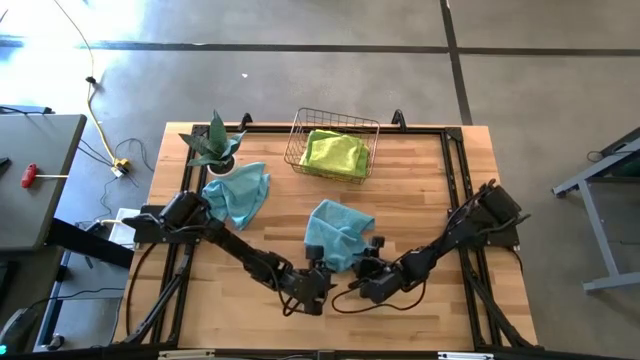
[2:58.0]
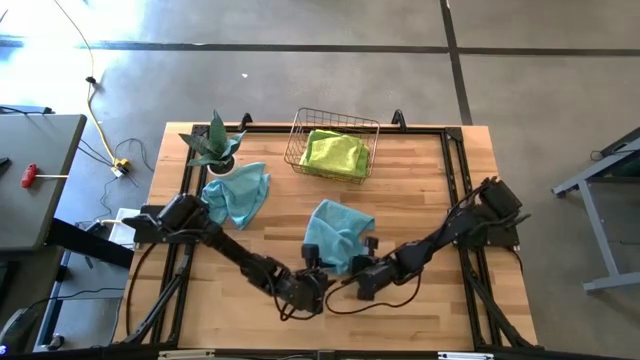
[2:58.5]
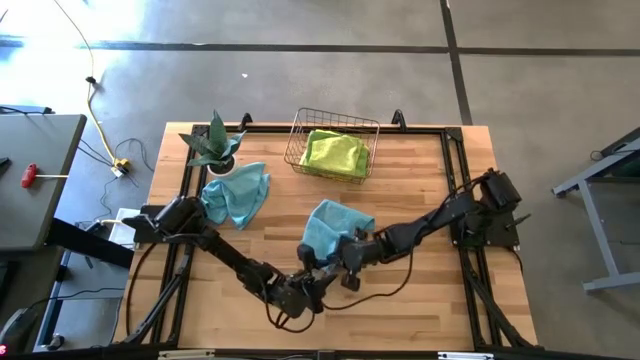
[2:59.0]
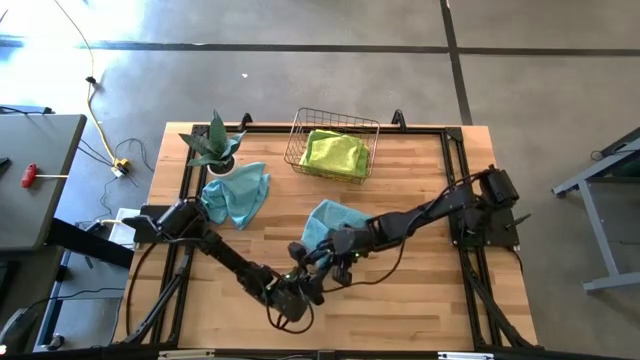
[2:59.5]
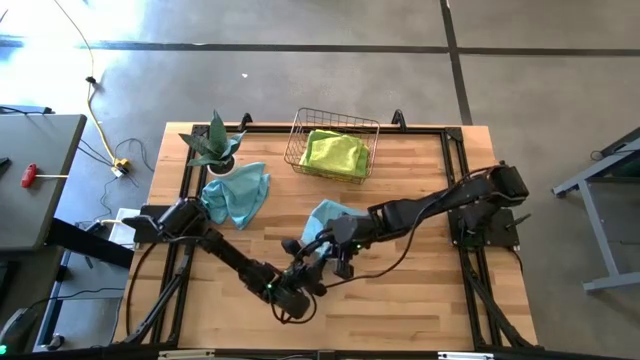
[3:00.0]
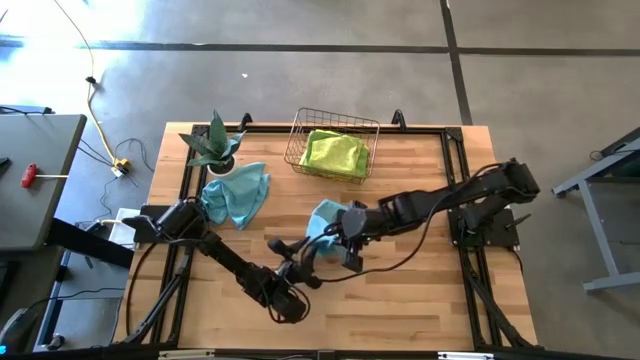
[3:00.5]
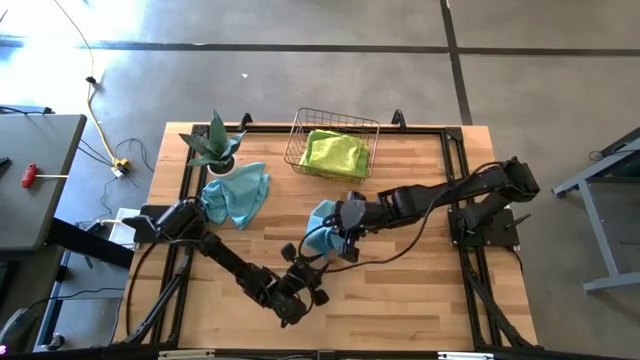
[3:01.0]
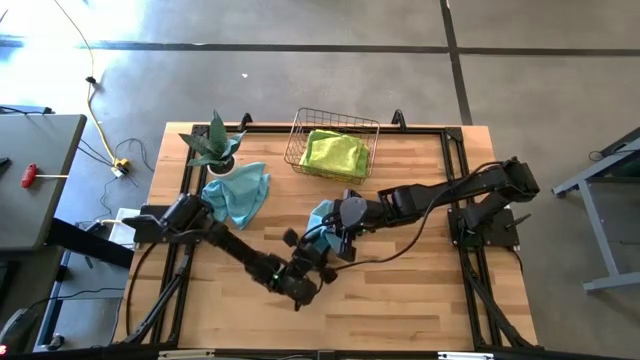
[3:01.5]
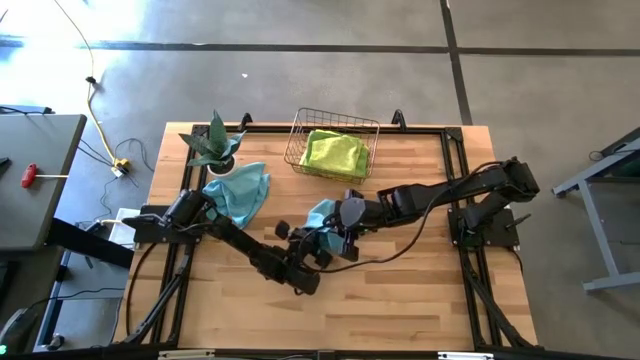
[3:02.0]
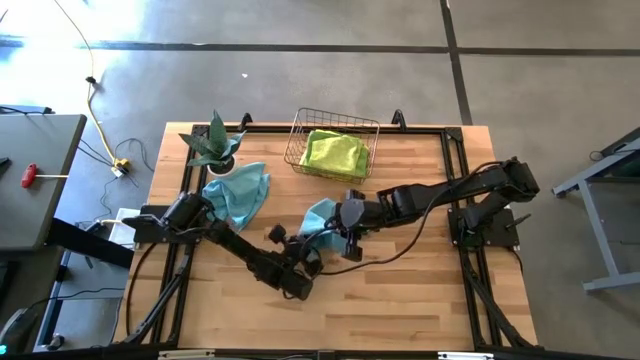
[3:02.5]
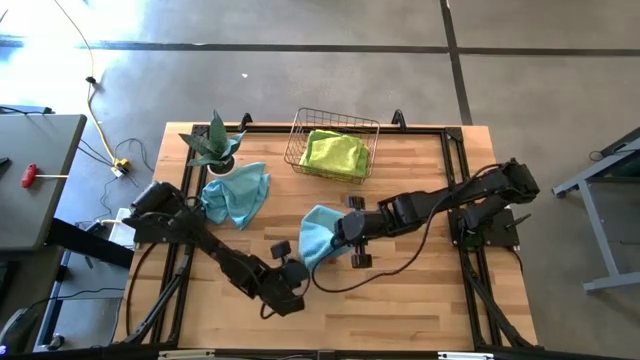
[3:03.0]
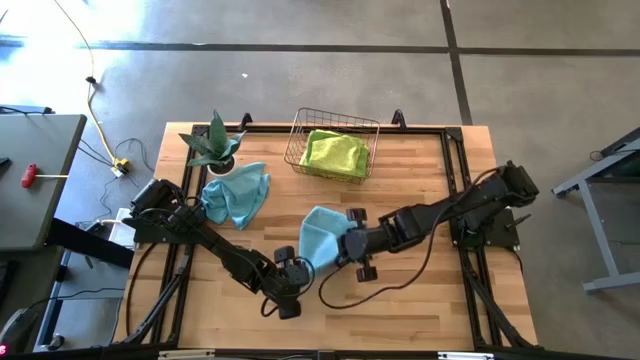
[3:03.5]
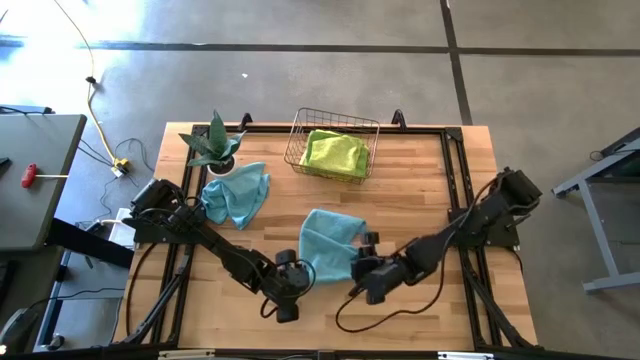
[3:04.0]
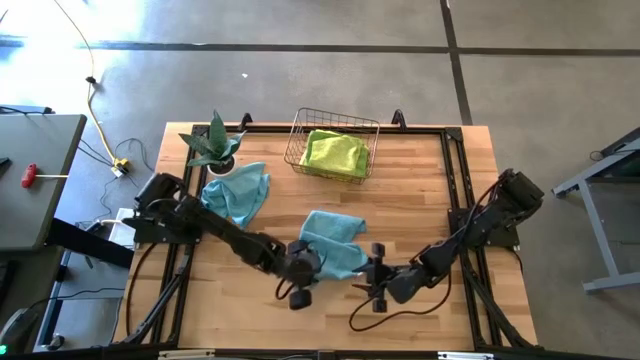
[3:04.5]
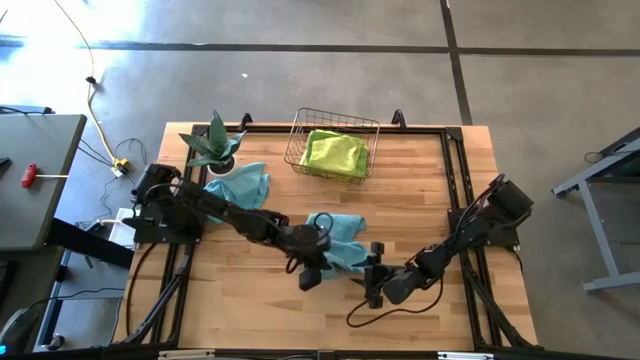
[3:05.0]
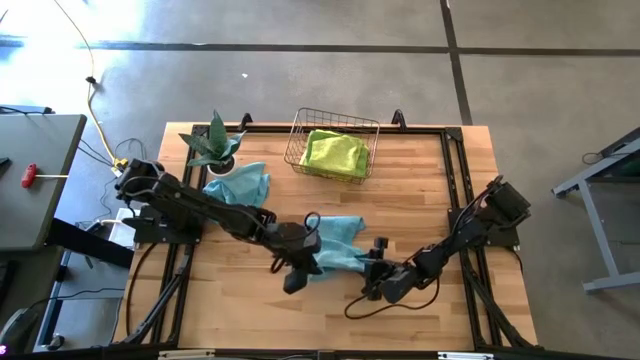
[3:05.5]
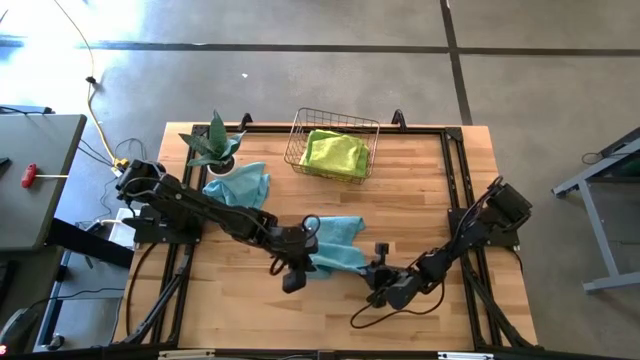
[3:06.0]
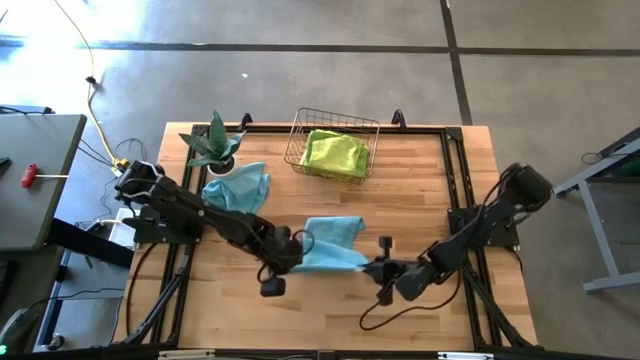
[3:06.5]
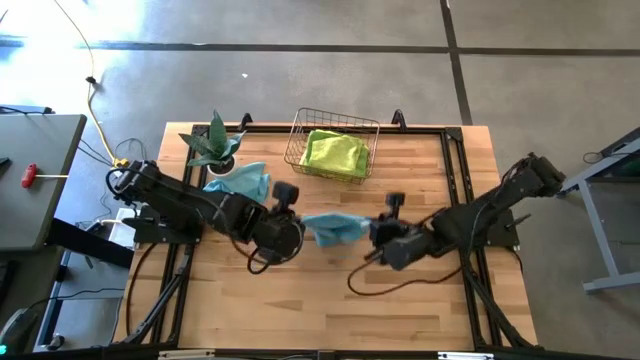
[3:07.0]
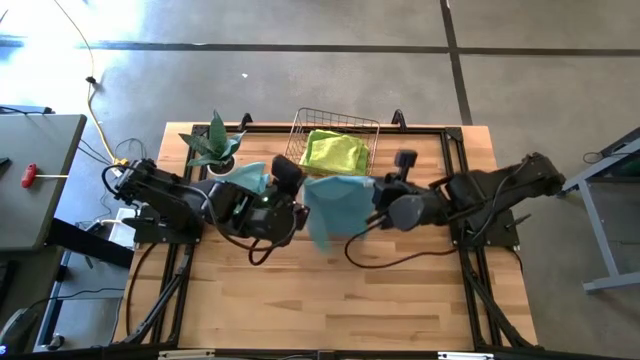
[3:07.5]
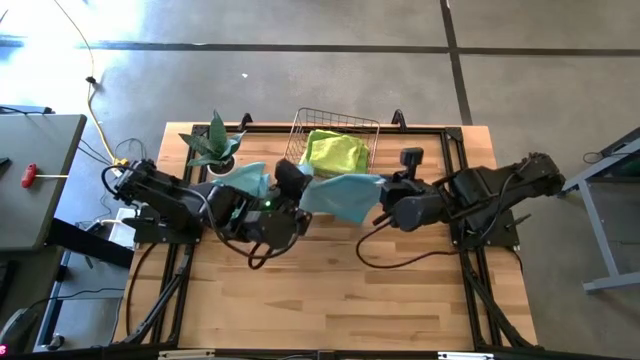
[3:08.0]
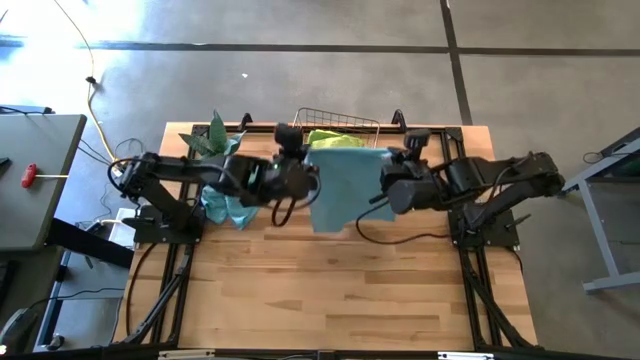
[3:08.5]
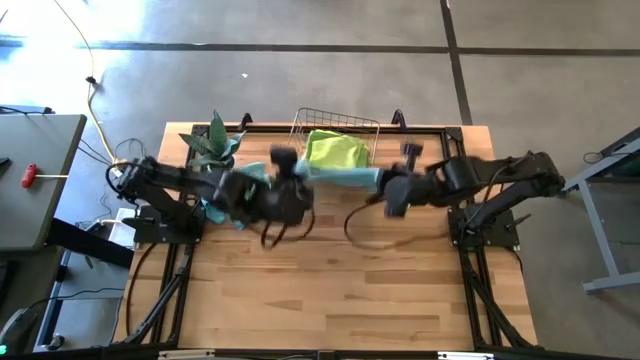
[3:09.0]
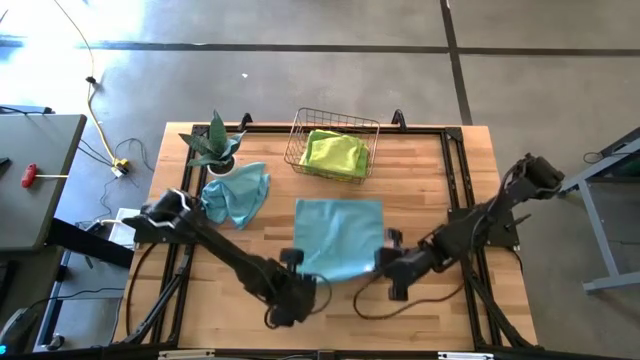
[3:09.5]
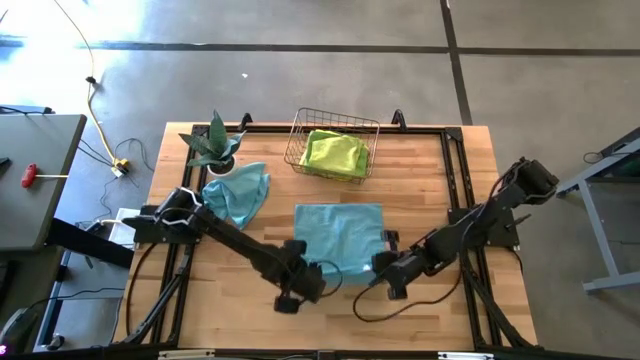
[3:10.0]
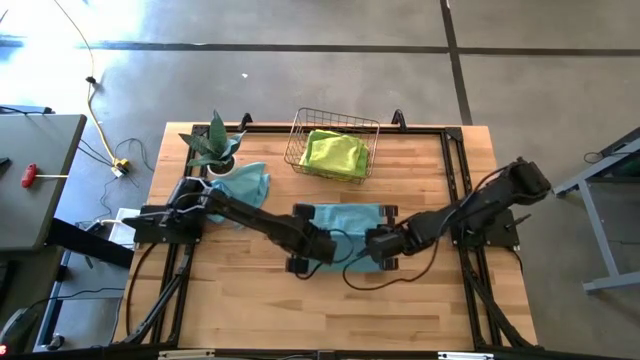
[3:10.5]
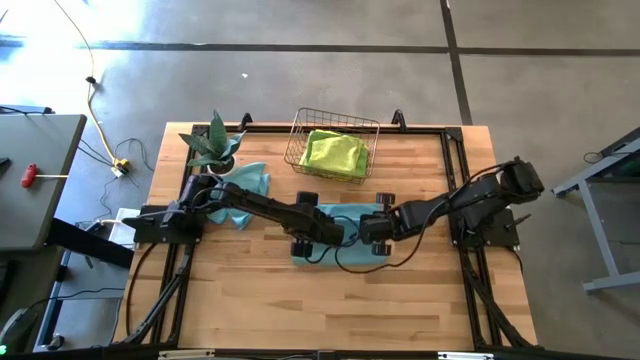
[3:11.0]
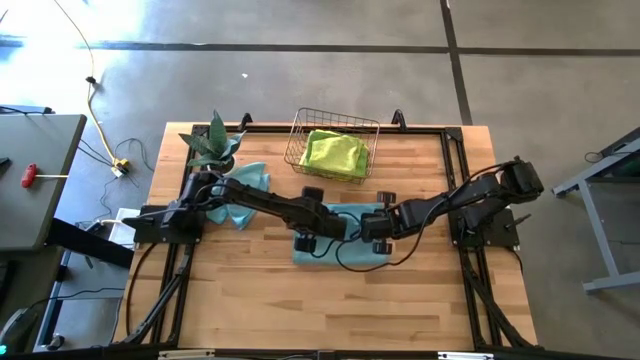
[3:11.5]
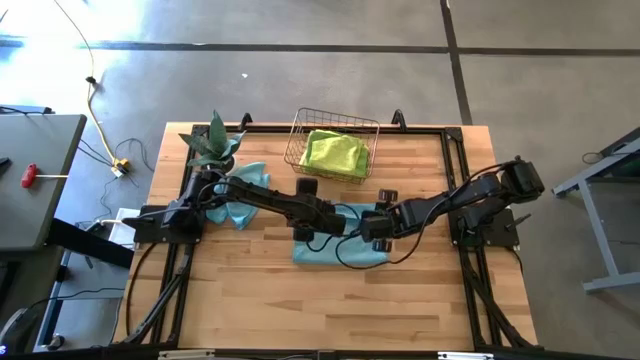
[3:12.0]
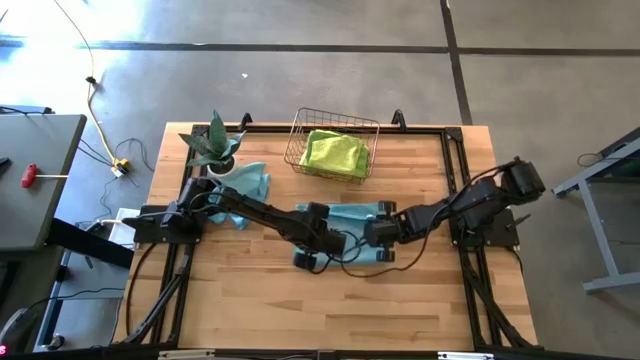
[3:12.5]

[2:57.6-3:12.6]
Task: Fold microfiber towels
Fold the bottom blue microfiber towel

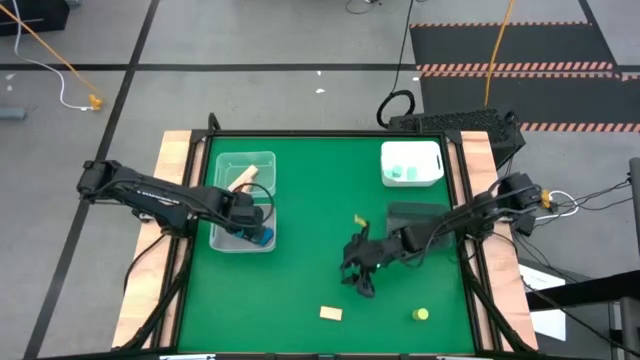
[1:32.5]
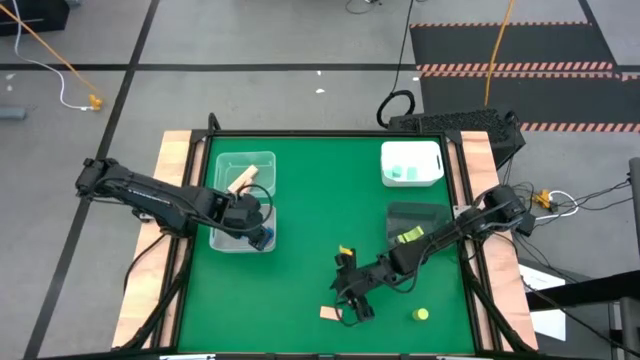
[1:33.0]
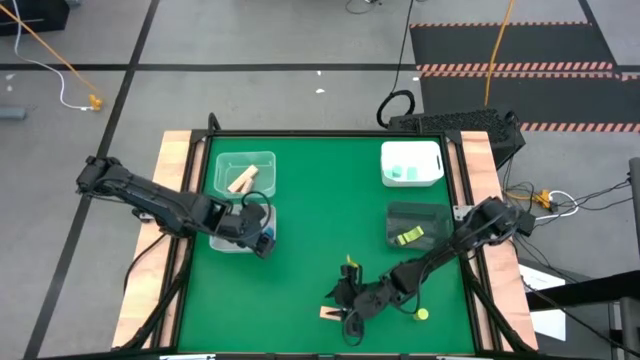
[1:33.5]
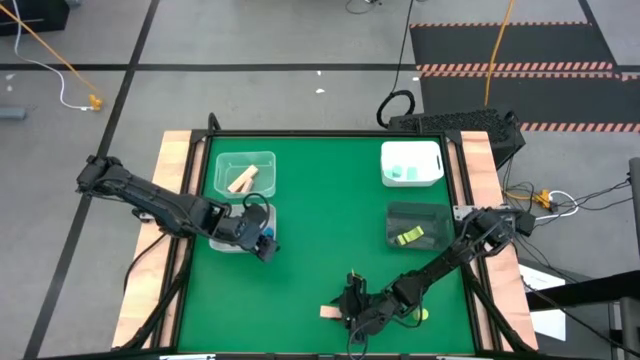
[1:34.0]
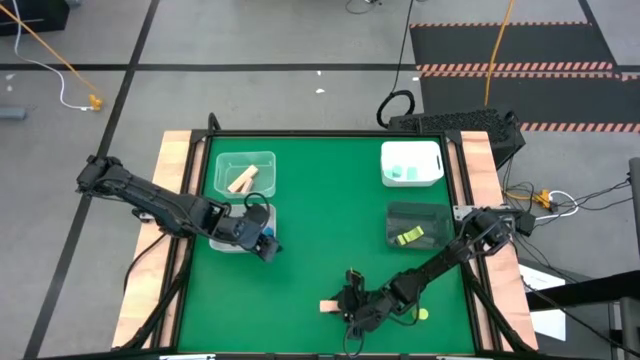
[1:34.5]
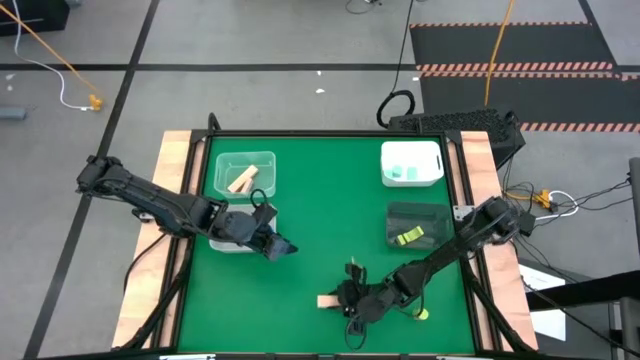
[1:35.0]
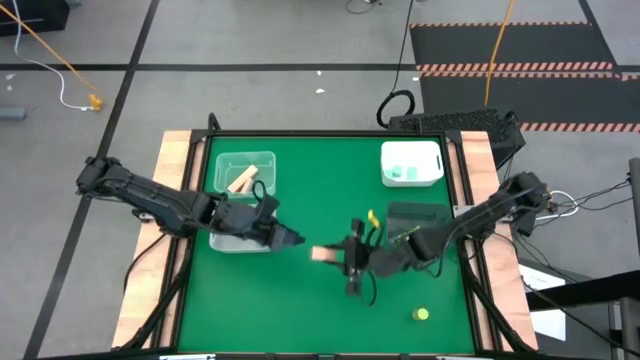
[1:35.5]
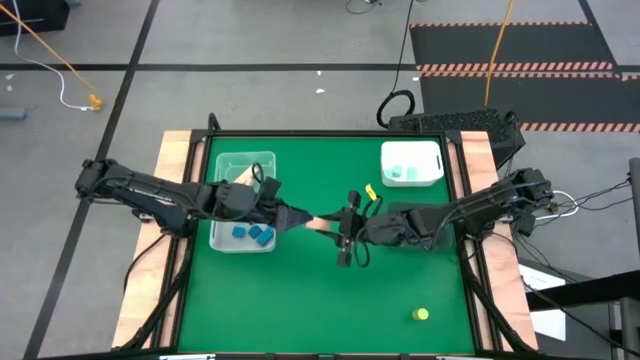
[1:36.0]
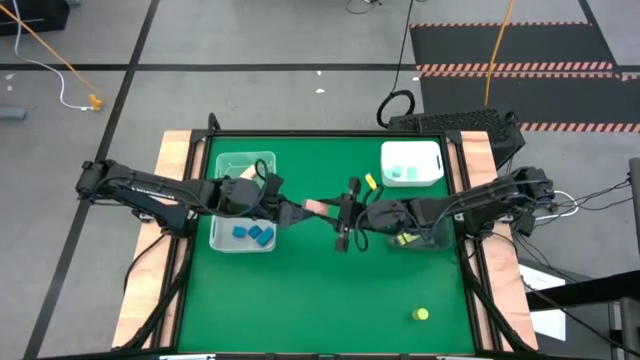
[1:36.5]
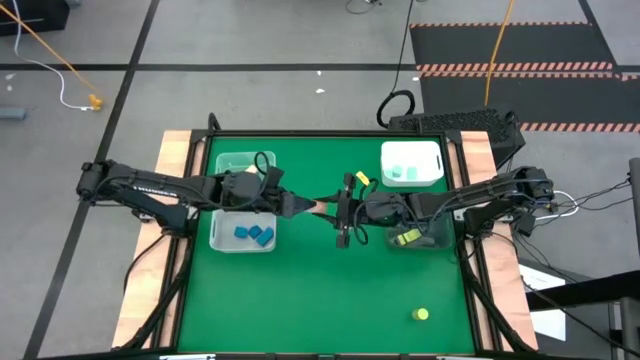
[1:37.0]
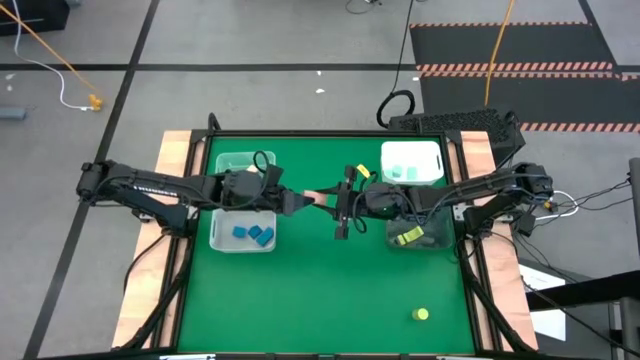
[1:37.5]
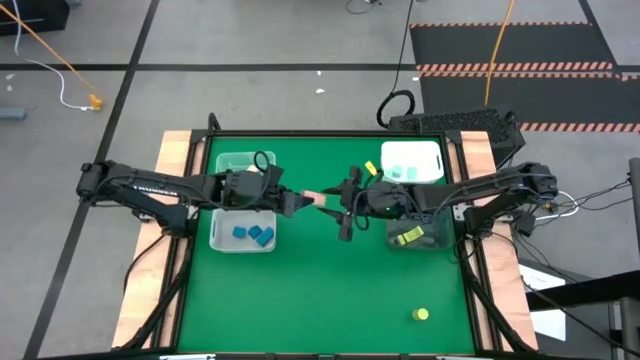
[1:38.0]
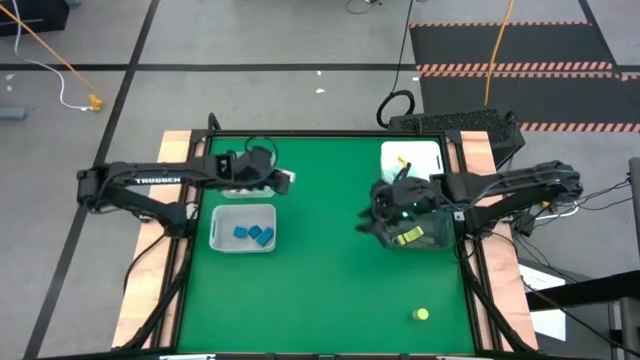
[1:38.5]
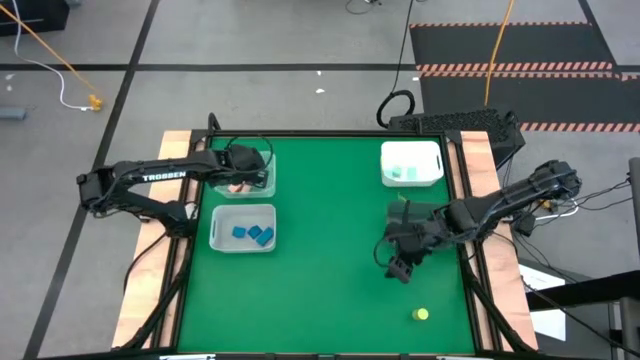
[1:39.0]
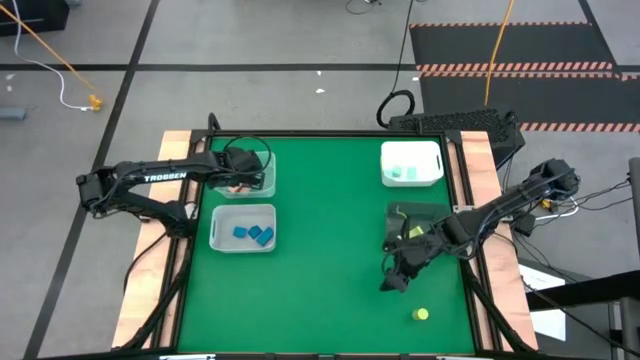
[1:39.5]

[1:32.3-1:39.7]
Task: Sort & place blocks by color
Put the brown block into the transparent bin
